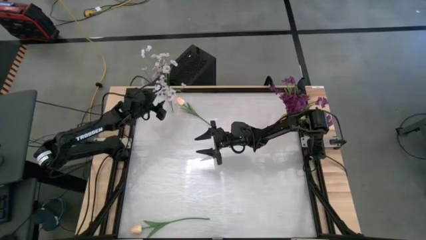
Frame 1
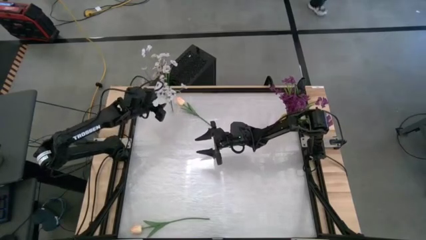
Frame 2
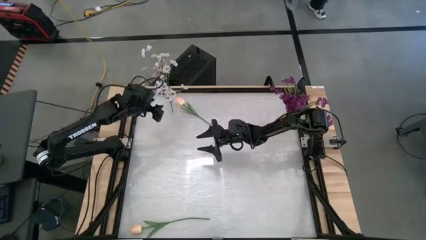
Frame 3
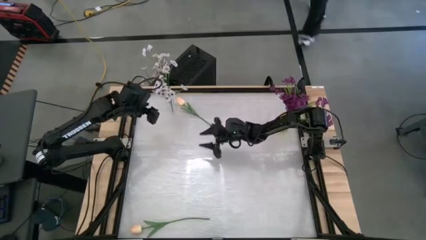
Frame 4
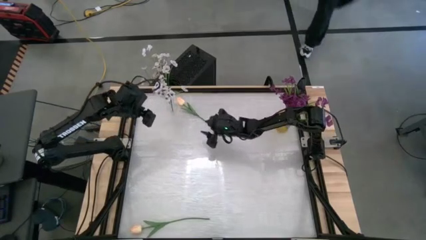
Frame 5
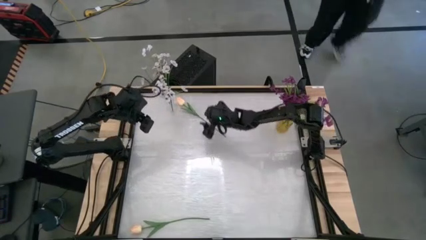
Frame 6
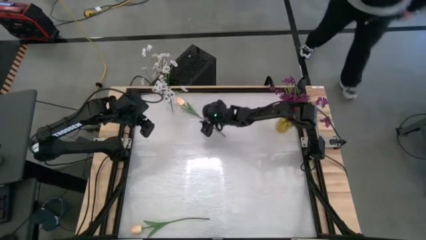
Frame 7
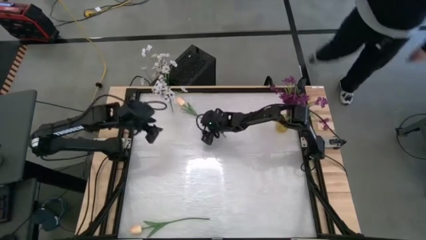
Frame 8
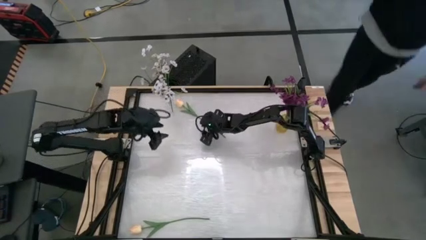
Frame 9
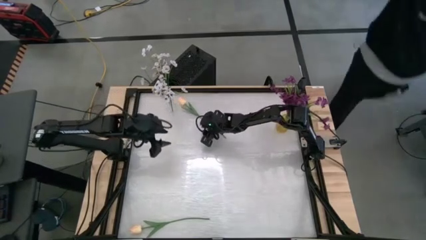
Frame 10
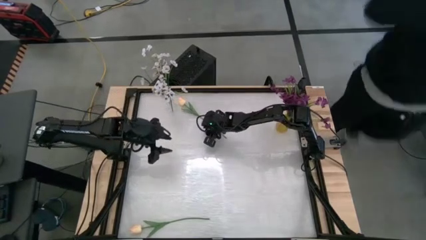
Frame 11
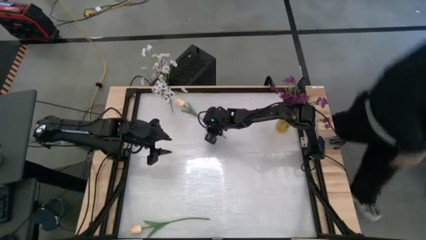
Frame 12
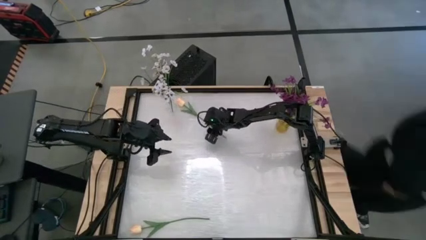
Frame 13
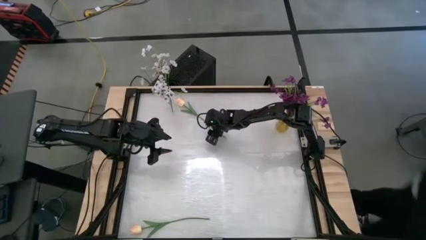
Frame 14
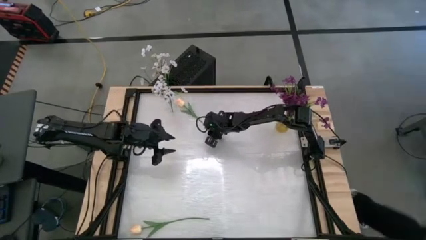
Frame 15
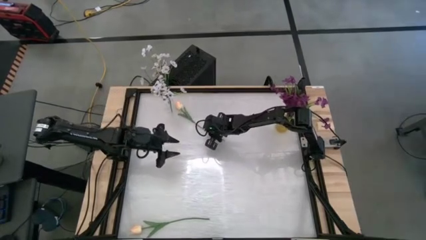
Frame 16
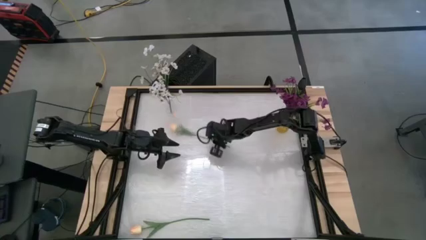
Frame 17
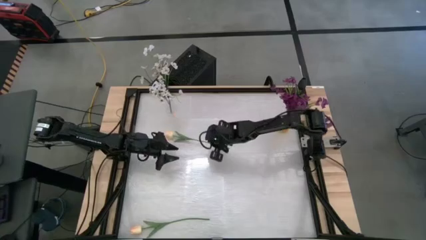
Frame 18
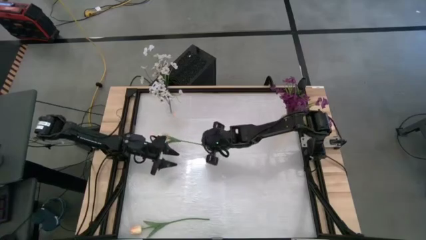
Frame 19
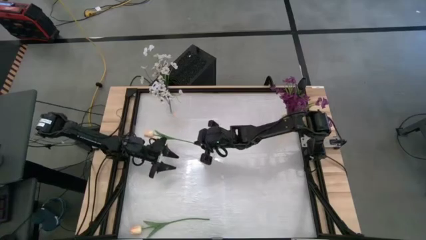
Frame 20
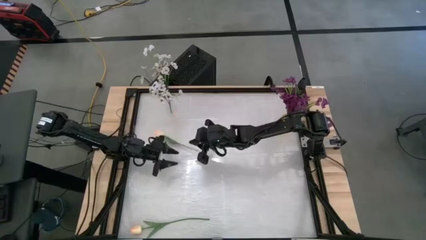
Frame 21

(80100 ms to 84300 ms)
Task: Sort flowers into vase by color
Put the top white tulip into the transparent vase

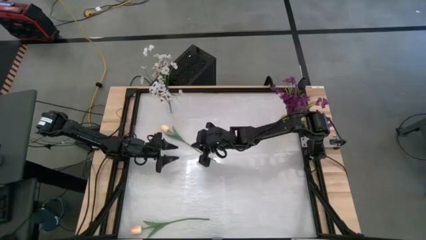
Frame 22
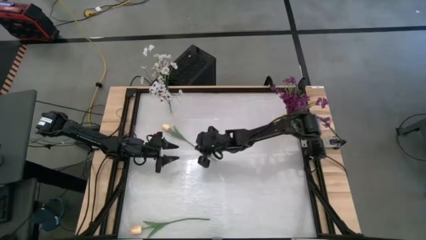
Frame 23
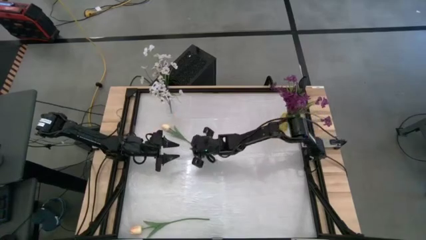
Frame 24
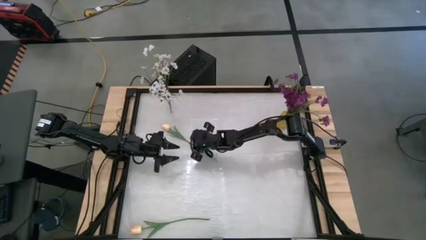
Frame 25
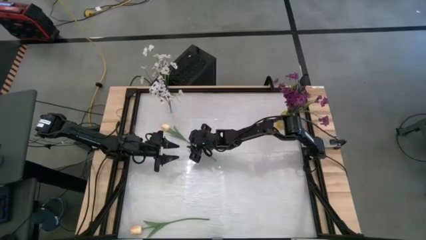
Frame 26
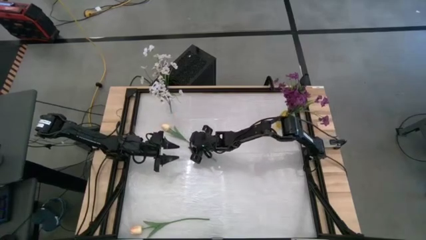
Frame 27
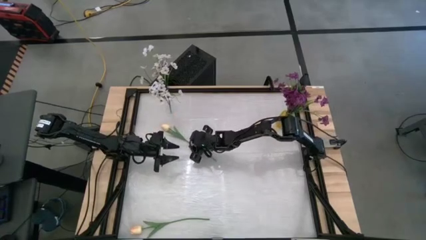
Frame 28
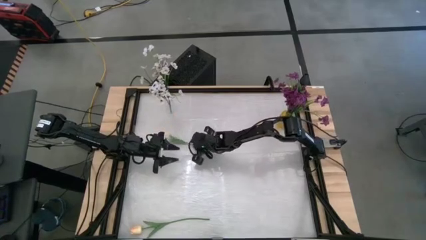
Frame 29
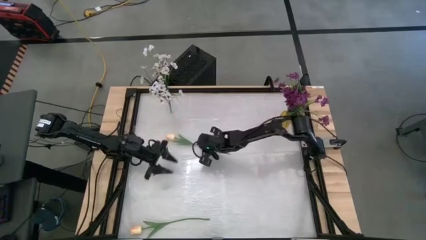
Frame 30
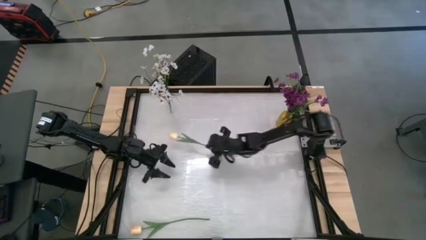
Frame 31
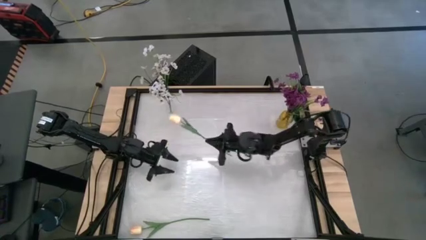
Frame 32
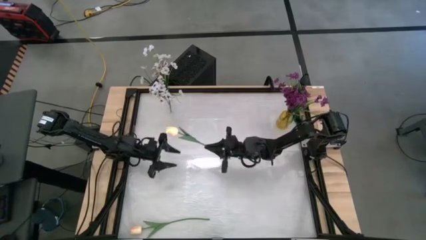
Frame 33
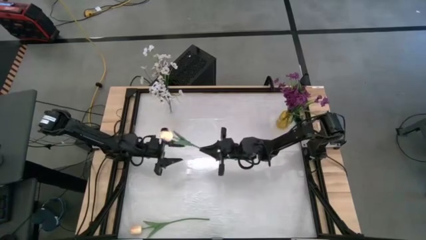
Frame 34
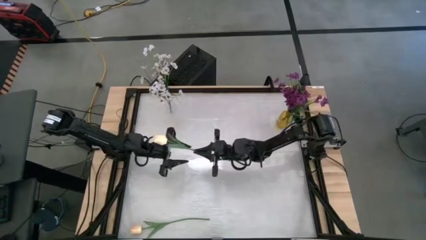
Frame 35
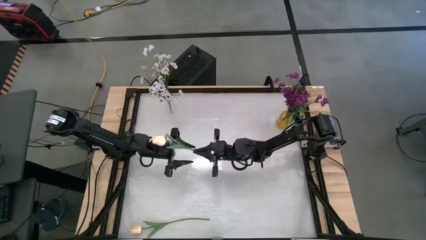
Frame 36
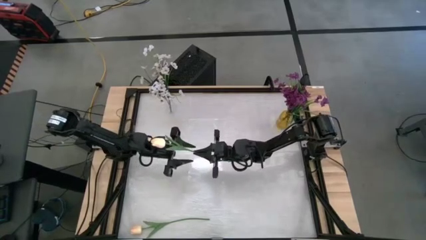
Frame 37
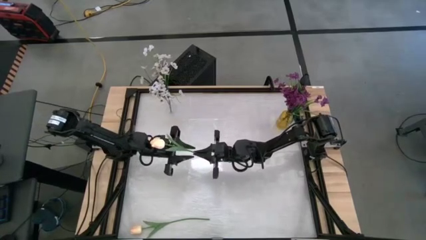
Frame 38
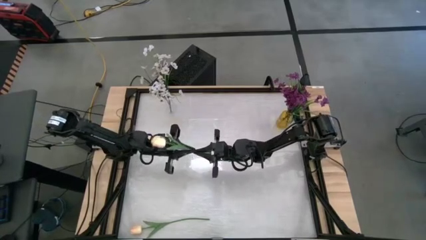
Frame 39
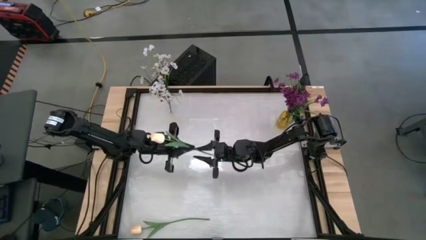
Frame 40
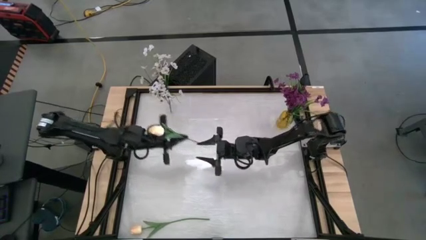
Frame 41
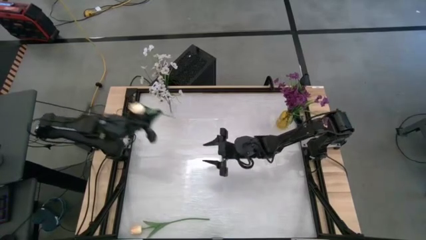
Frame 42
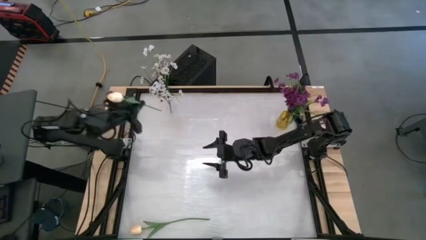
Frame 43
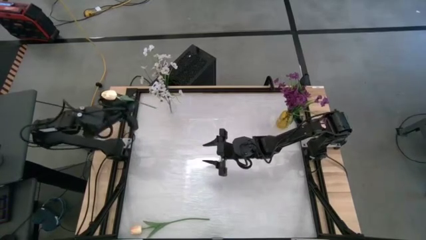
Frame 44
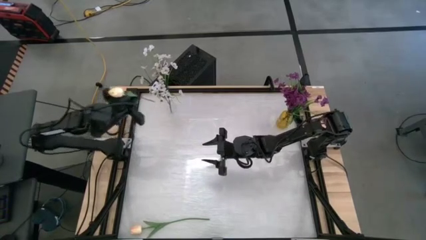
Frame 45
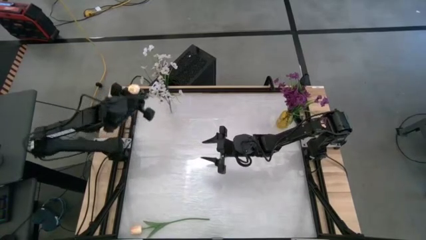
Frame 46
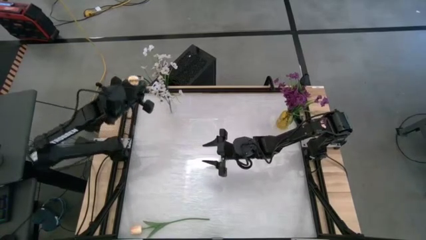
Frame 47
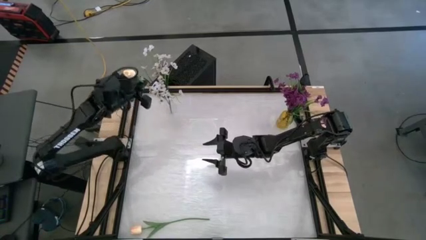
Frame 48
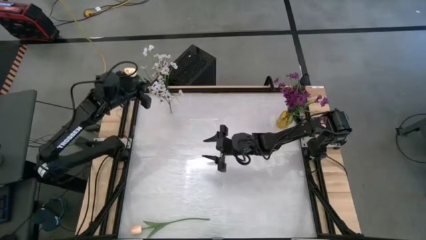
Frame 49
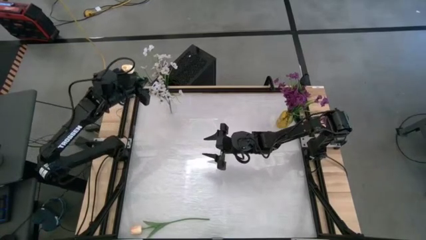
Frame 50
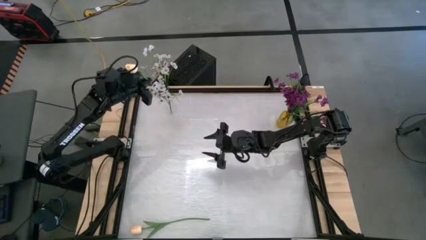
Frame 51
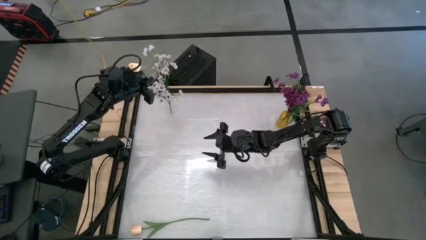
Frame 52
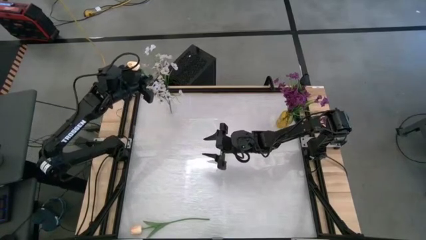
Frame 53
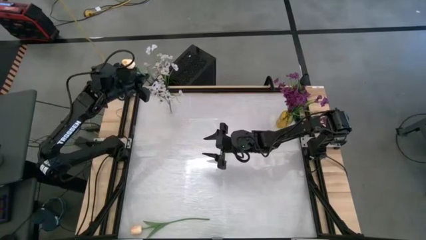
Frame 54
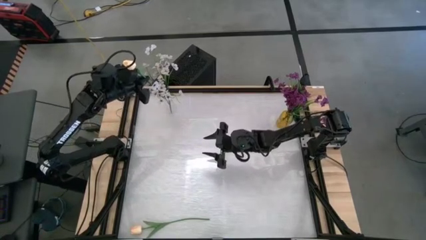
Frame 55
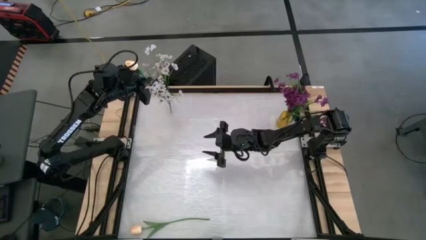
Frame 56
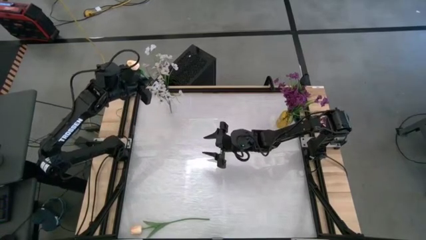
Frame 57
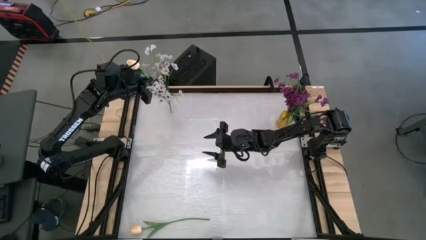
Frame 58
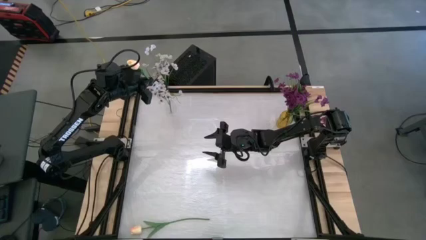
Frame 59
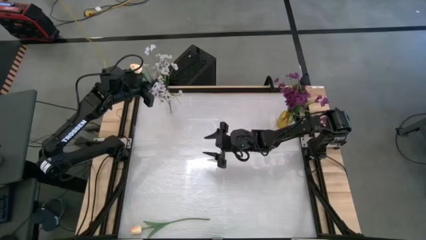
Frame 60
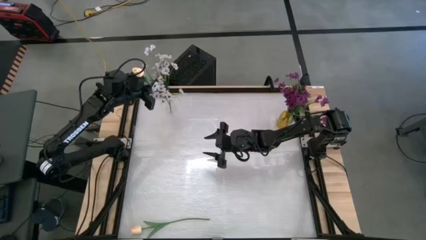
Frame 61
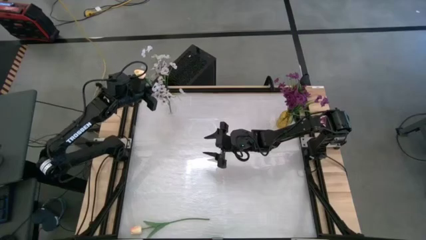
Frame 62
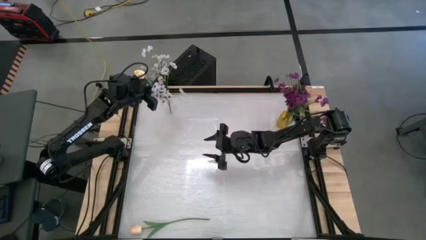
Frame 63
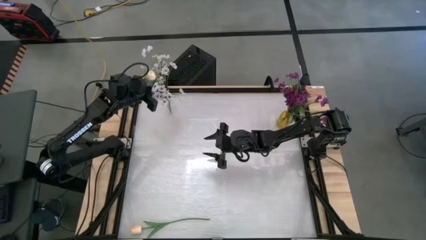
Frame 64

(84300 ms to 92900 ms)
Put the top white tulip into the transparent vase

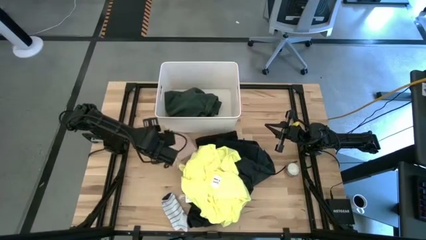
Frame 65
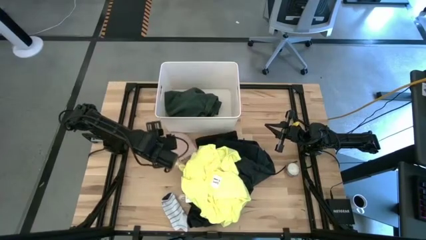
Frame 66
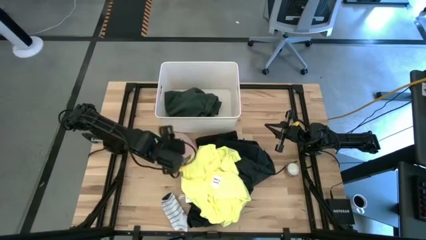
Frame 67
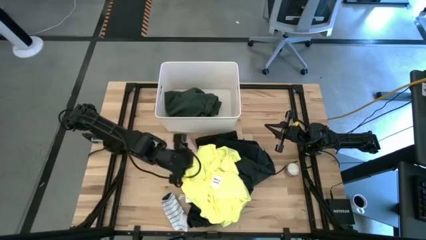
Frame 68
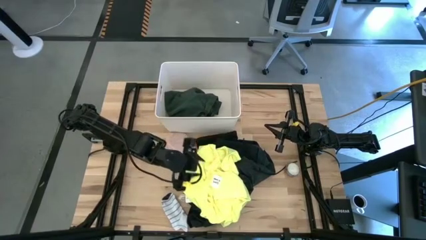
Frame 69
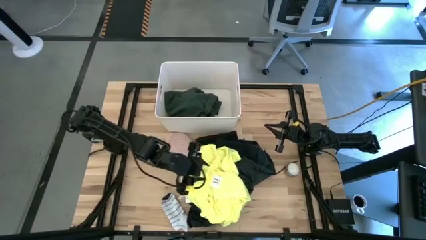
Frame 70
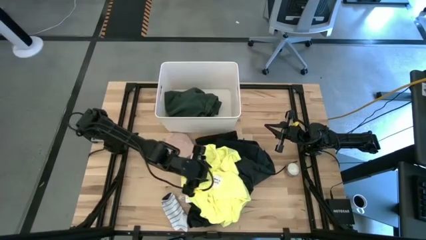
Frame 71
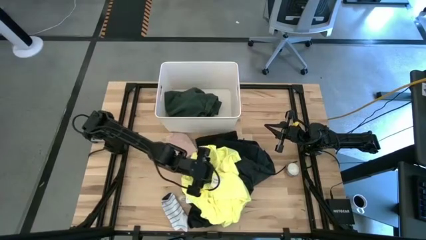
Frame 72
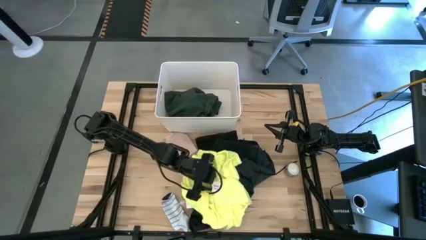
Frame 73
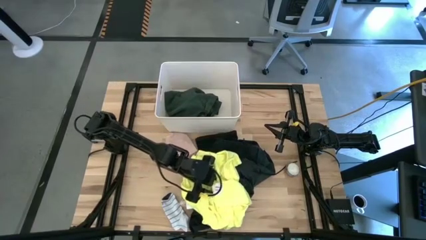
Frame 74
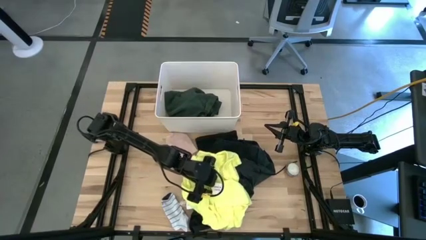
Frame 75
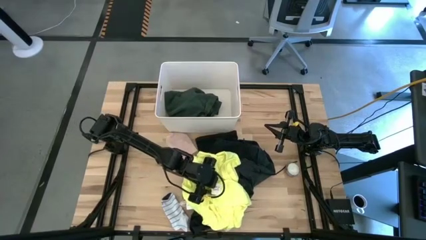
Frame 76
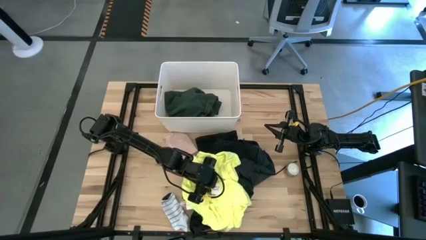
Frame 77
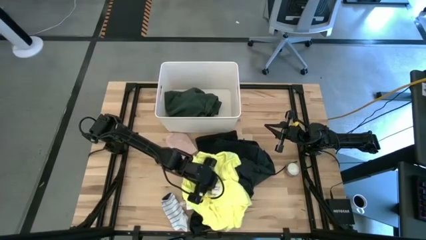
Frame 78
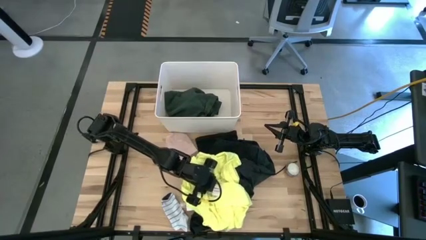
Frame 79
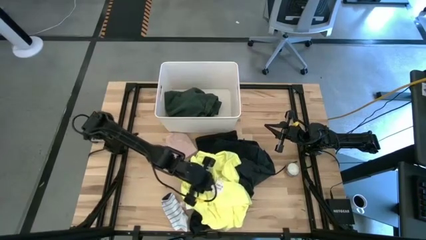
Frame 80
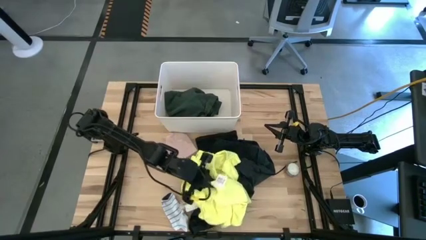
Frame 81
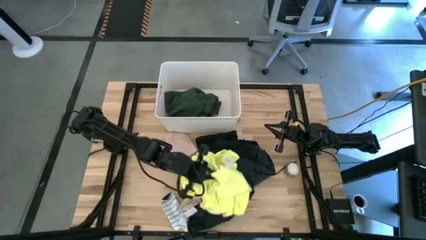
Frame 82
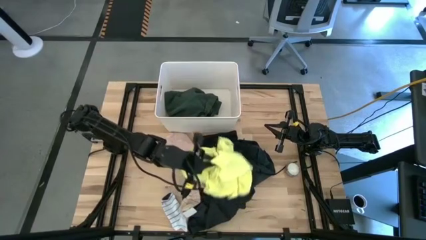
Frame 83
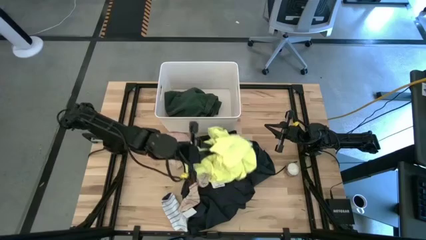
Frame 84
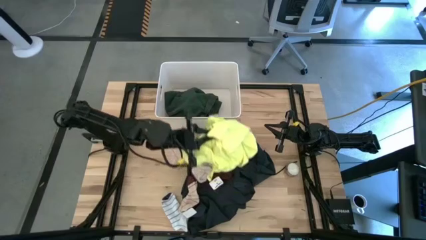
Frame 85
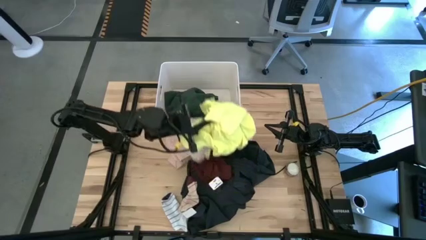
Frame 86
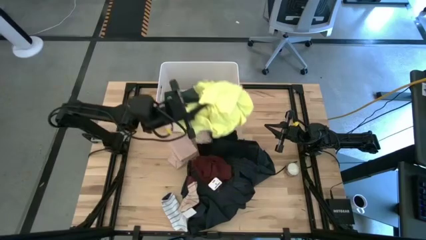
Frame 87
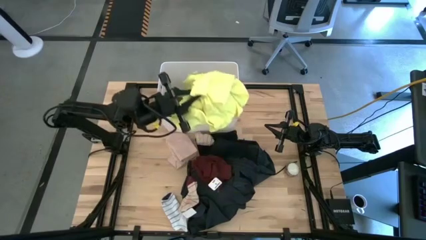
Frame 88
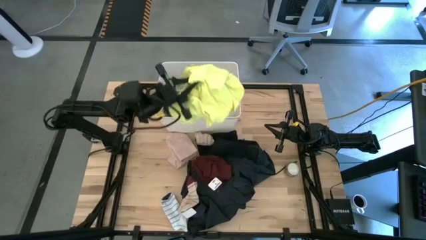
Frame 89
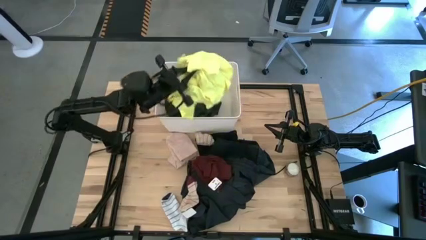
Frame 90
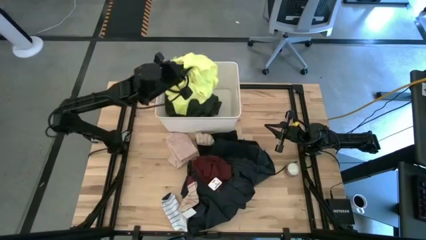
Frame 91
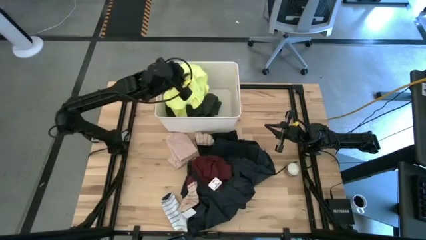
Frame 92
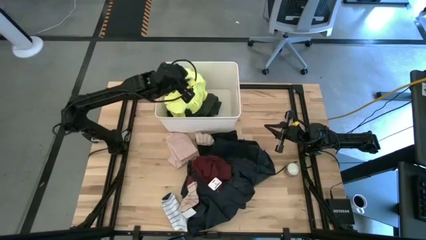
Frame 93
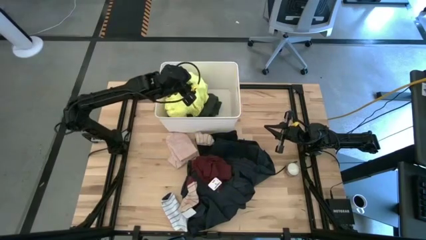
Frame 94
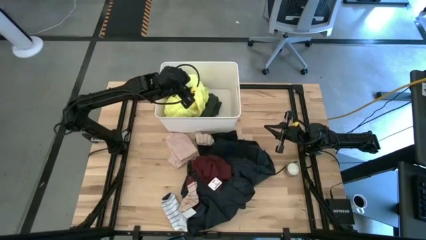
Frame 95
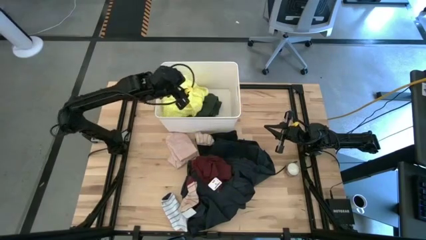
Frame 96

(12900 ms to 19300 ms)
Task: Sort clothes
Put the yellow shirt into the white laundry organizer
